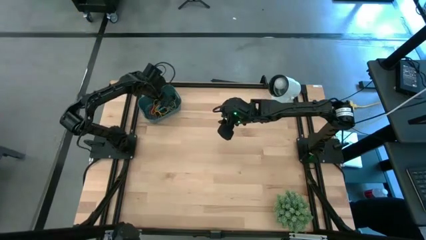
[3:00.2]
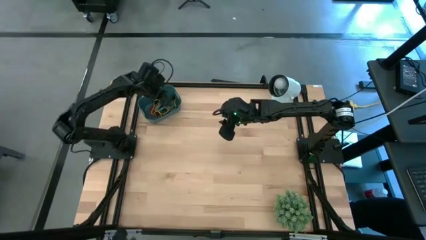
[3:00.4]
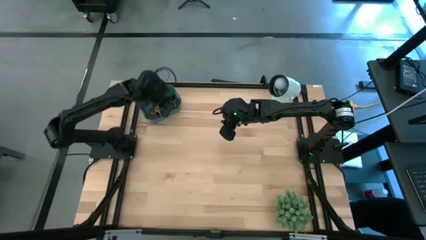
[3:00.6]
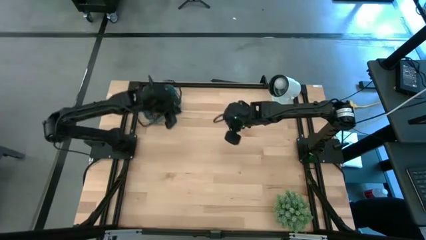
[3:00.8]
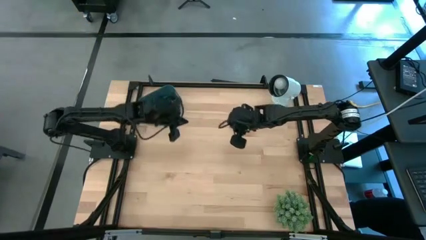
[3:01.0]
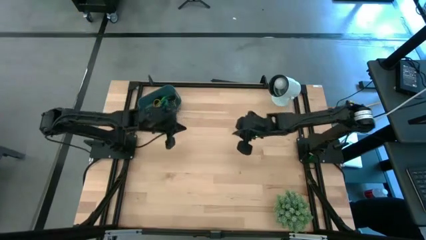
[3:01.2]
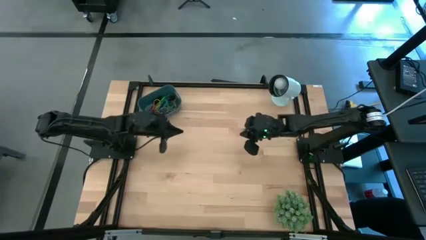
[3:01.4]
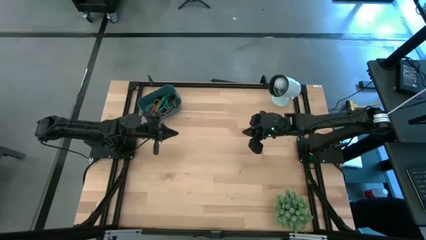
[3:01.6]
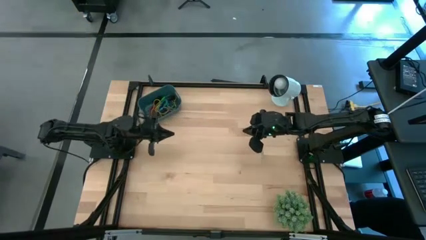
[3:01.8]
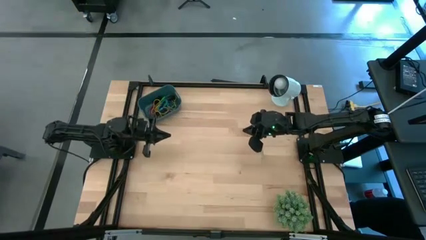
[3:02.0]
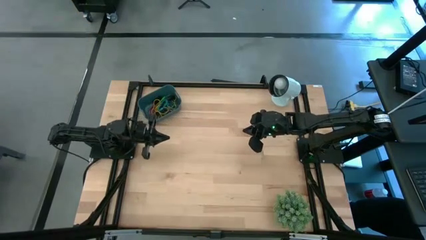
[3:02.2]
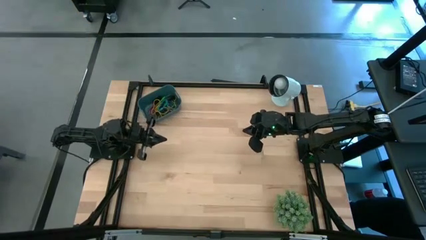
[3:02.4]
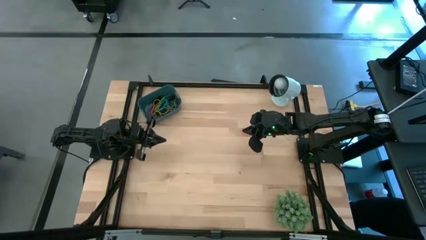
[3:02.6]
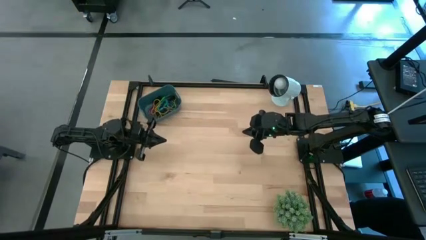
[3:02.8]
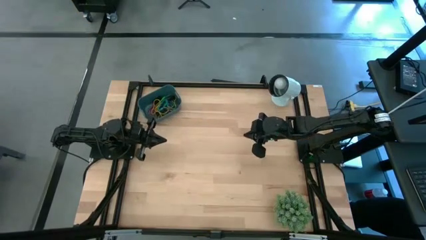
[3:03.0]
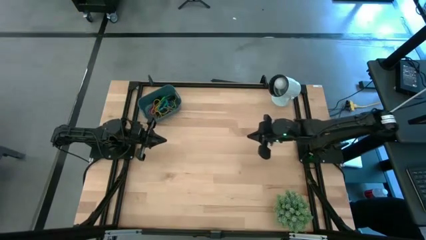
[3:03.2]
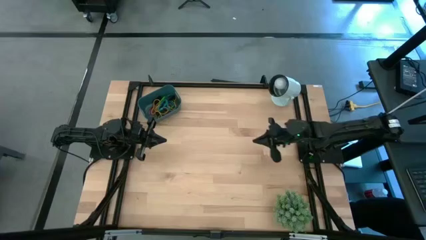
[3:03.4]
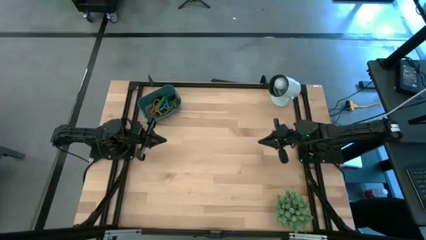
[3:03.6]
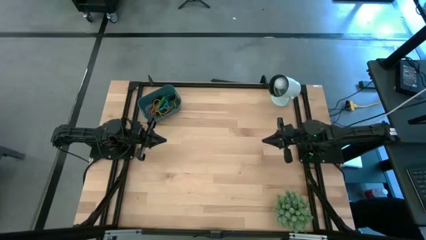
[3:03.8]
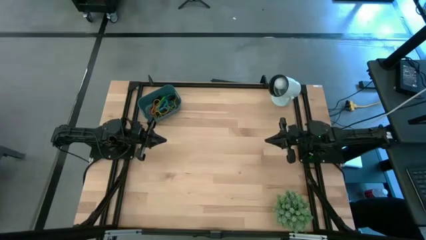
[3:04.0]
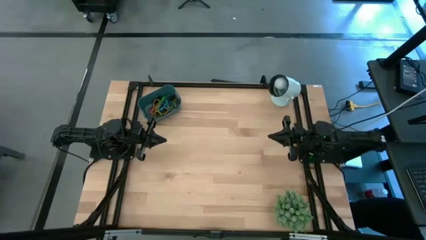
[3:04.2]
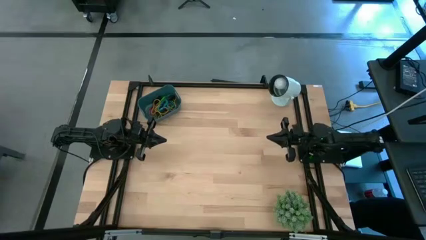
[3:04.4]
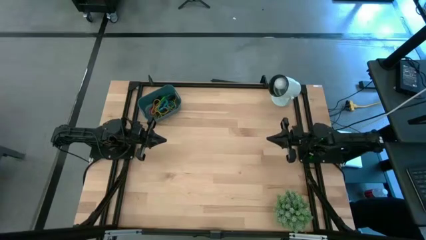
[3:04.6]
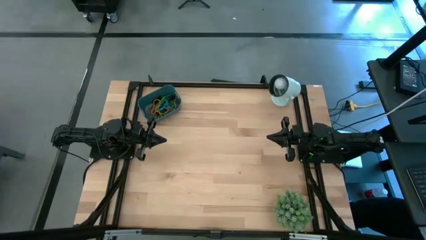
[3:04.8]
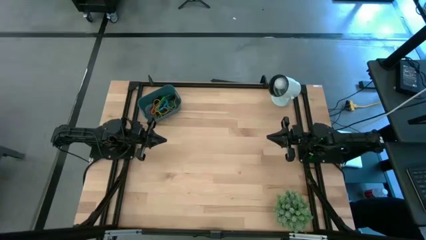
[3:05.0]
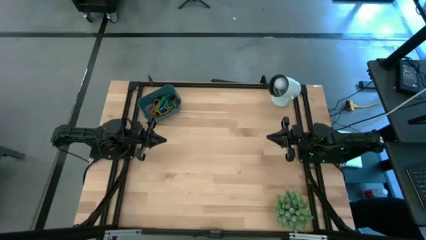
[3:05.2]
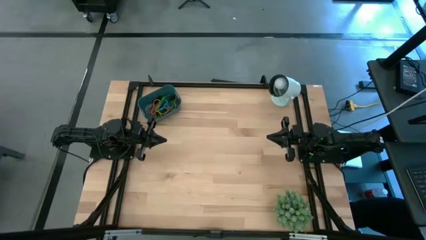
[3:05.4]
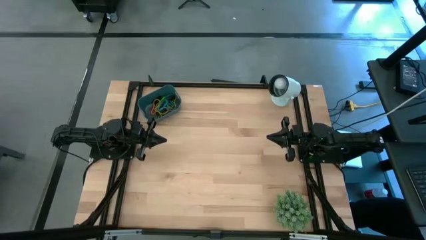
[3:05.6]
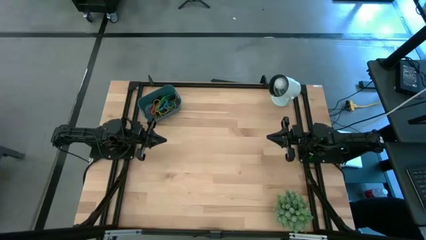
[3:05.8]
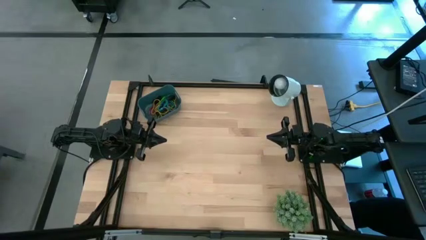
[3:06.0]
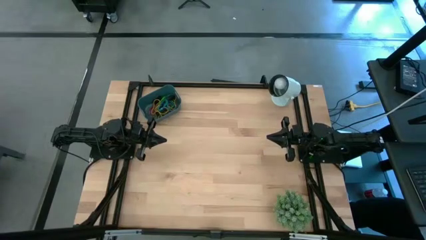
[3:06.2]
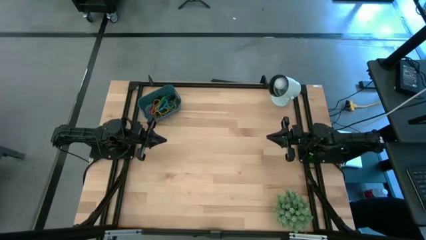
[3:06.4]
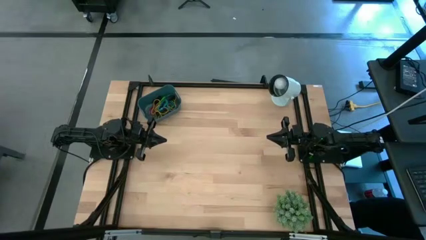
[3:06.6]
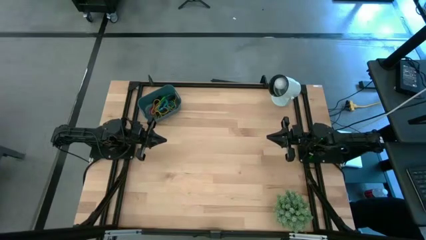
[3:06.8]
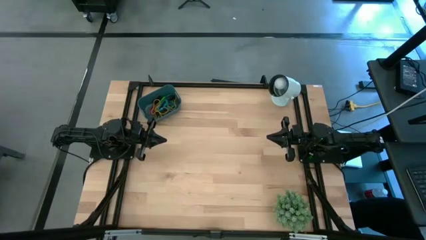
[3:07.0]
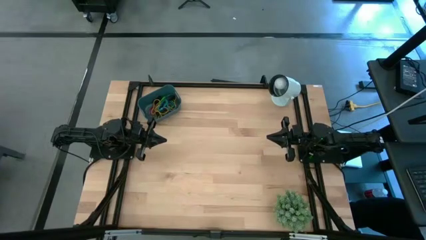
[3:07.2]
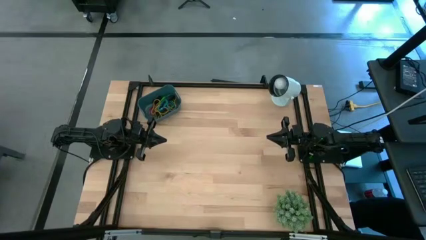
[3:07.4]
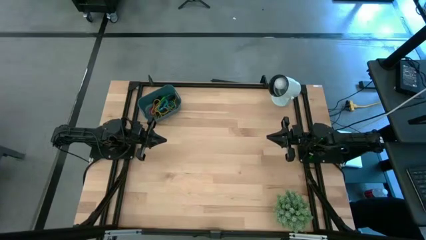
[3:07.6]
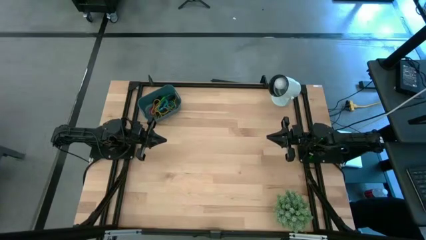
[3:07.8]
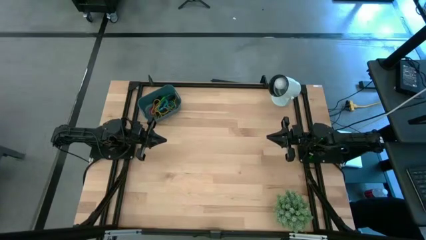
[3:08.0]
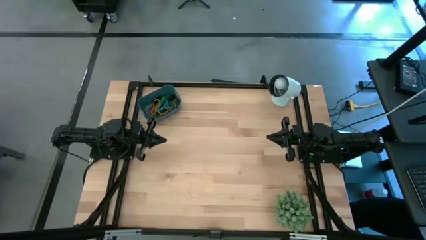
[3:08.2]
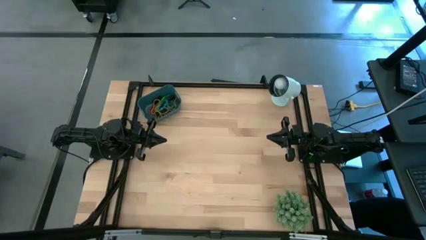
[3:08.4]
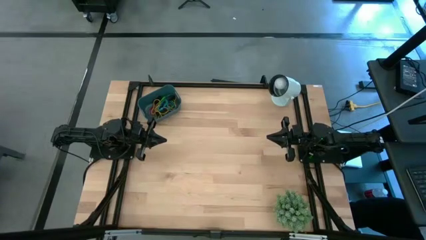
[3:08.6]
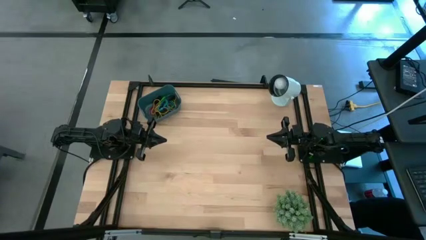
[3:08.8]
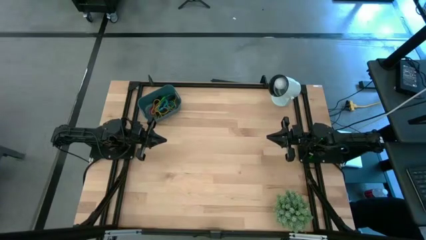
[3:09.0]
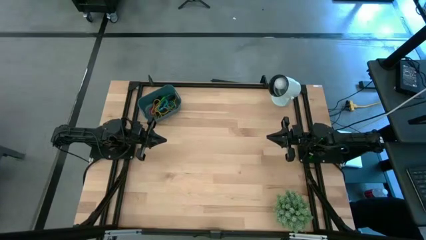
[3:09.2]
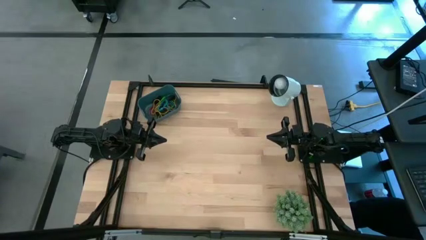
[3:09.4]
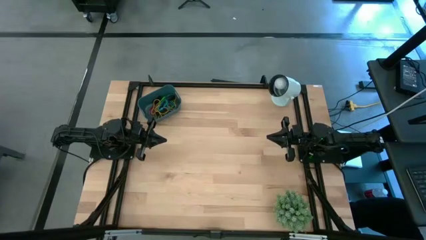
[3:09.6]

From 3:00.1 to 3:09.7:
Task: Pick and place rubber bands into bin
Return to Home Position

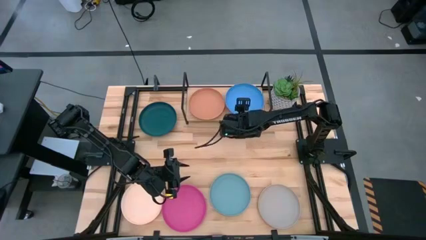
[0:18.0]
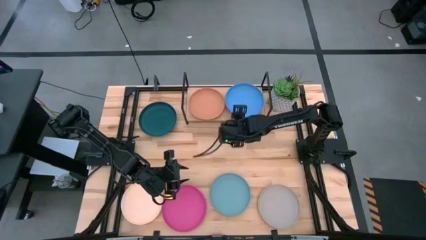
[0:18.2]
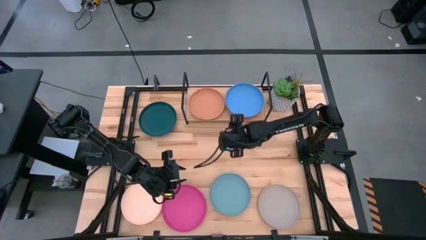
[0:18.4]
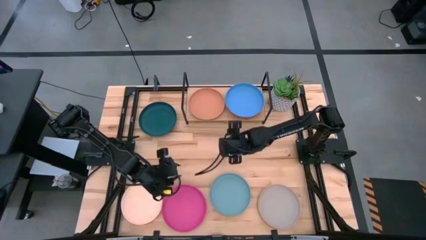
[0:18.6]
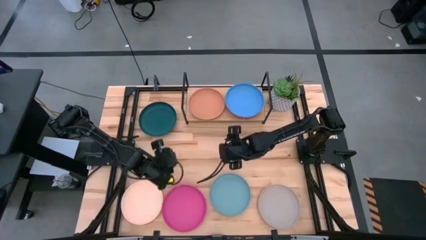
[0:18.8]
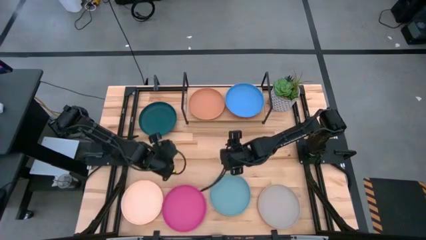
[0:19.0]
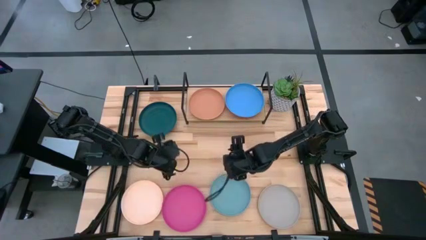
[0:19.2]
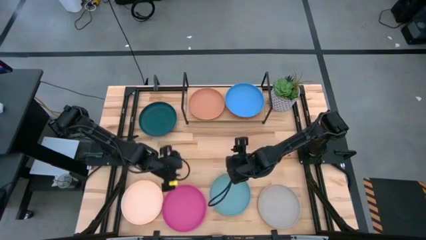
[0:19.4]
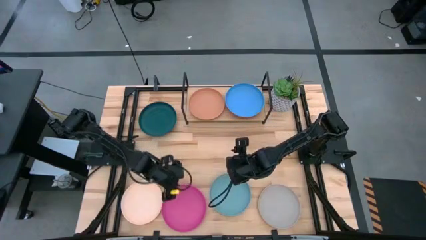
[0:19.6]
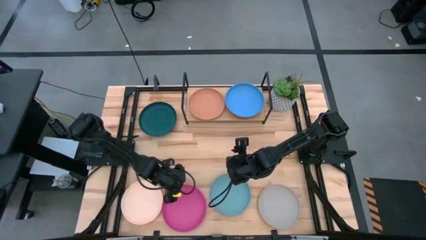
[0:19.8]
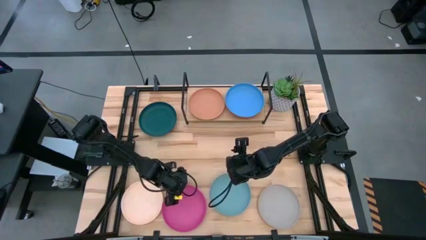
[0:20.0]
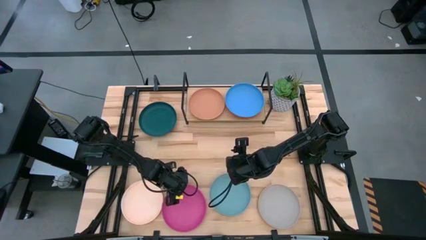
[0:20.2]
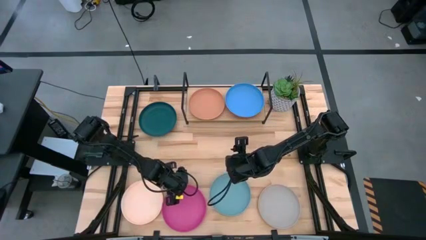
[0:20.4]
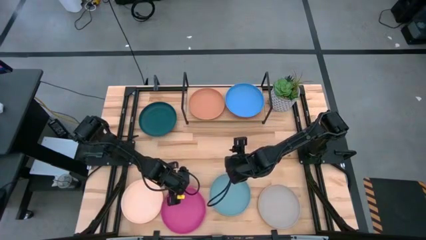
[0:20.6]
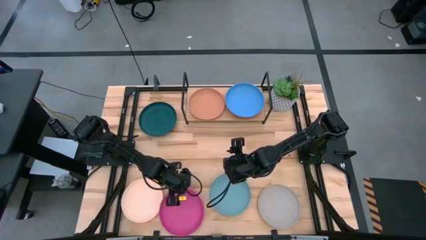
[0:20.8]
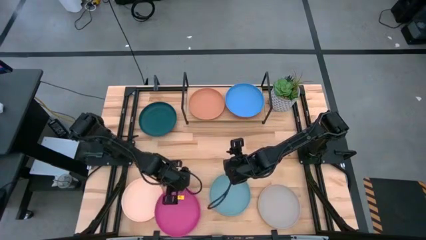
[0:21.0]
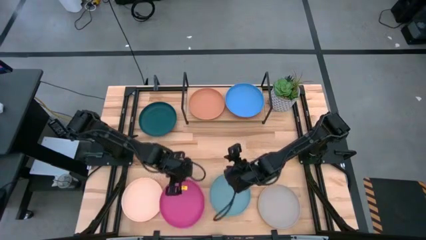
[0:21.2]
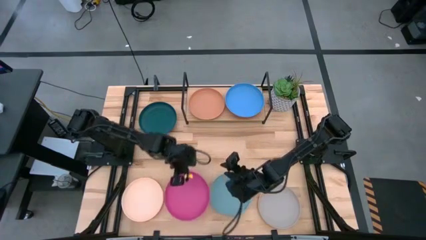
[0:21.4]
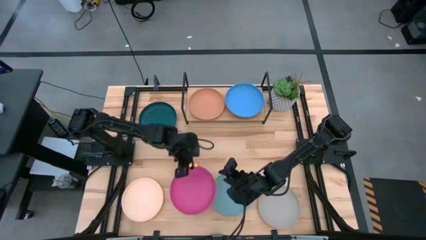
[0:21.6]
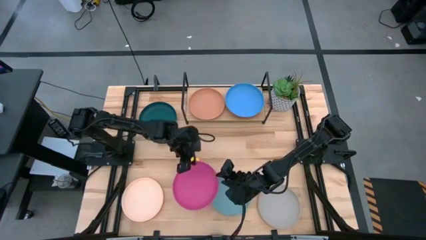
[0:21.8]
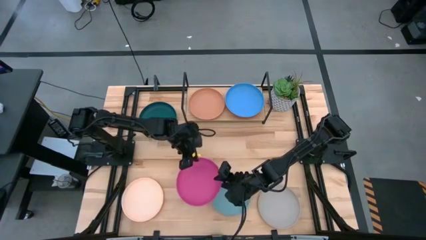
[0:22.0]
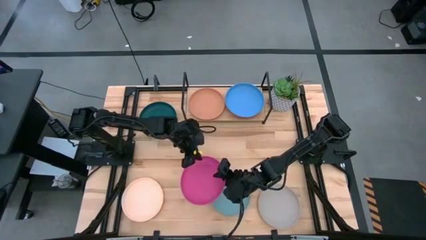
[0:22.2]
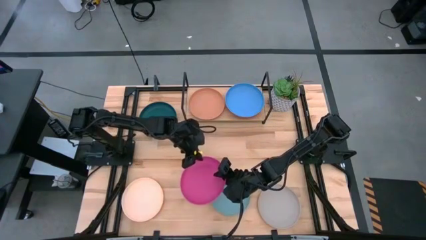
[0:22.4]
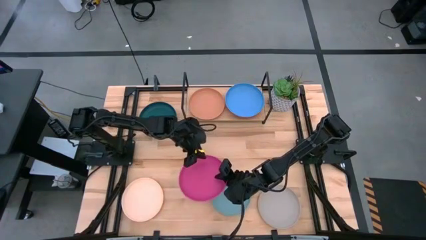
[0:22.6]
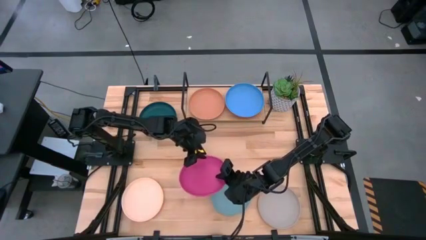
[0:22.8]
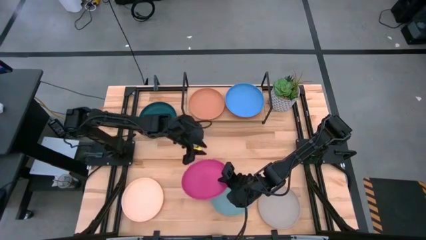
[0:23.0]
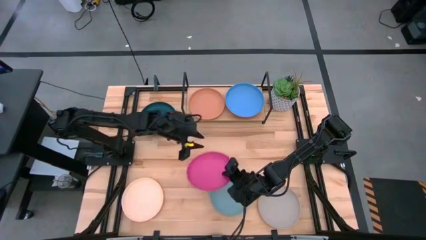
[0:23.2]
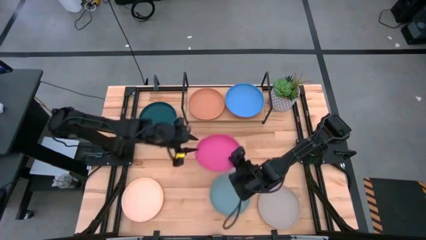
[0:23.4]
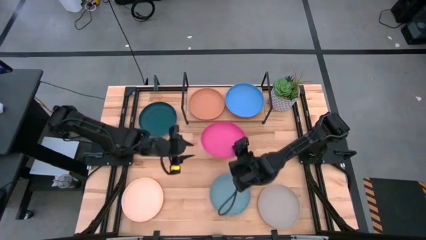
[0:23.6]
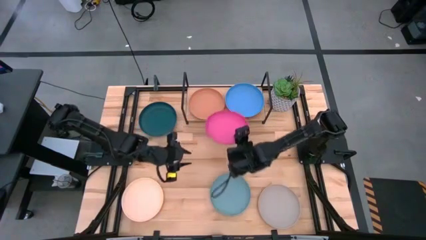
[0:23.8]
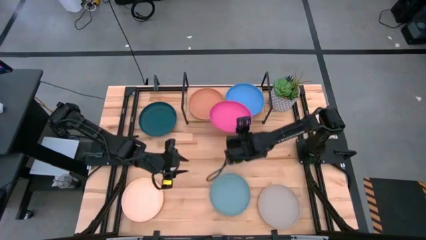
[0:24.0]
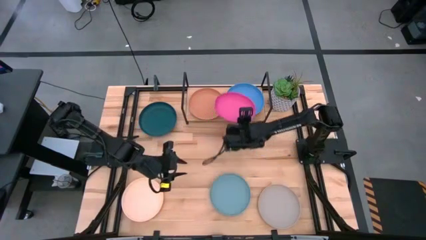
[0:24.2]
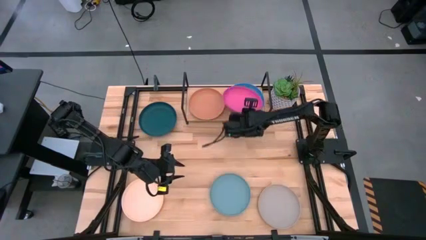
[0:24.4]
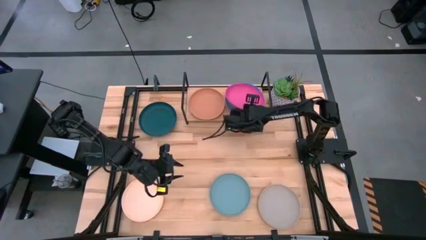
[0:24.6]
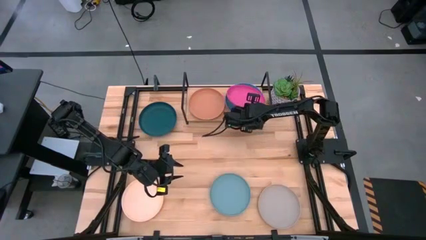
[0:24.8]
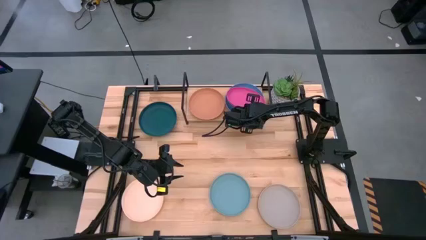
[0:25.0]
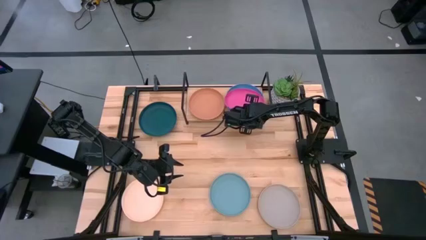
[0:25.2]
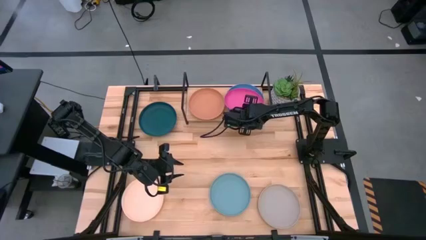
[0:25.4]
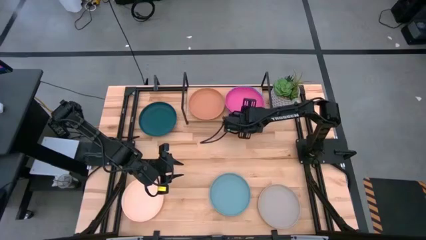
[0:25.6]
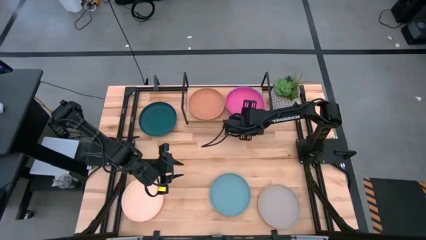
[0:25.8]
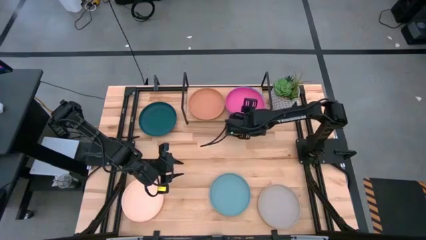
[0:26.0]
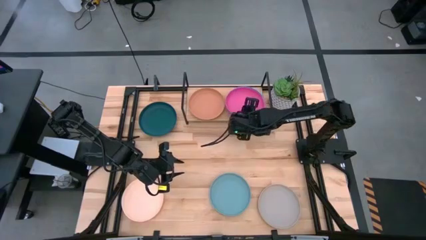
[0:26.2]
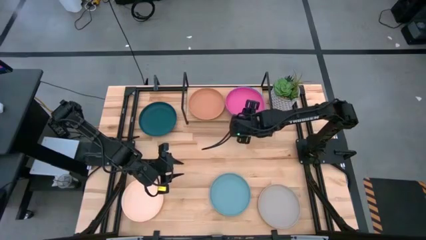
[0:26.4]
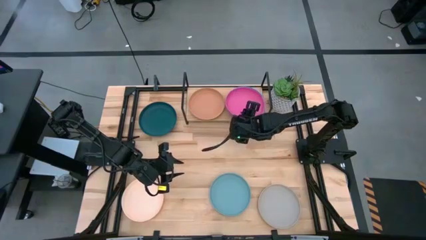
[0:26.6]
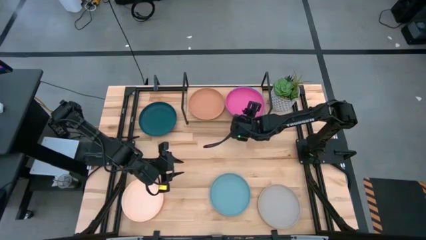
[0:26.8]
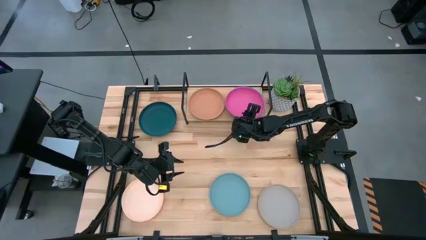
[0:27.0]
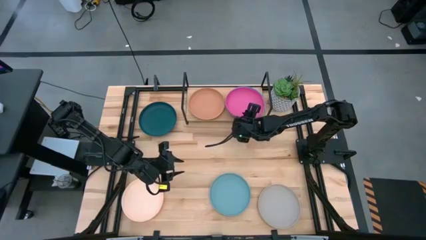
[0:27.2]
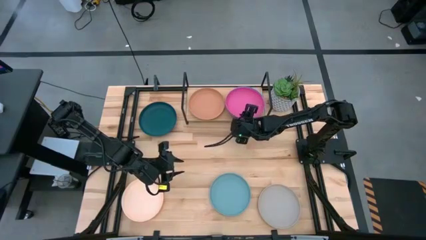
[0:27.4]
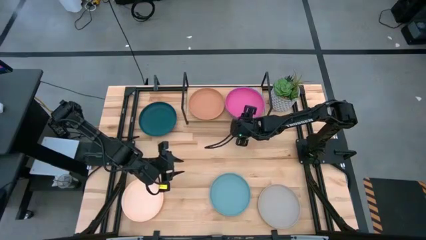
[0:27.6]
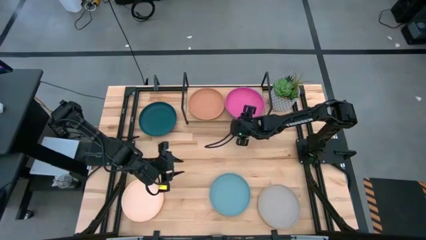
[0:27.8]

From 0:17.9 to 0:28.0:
Task: Place and stack plates onto a shelf
Stack the pink plate on top of the blue plate on the shelf
